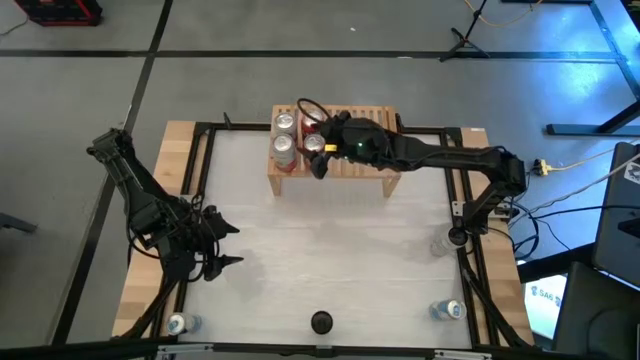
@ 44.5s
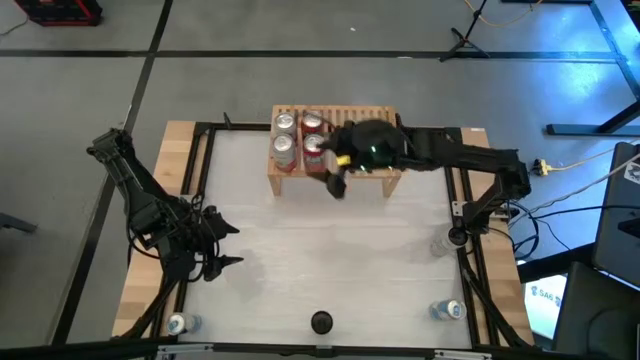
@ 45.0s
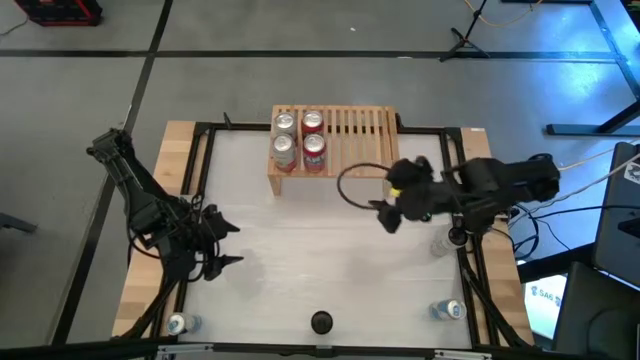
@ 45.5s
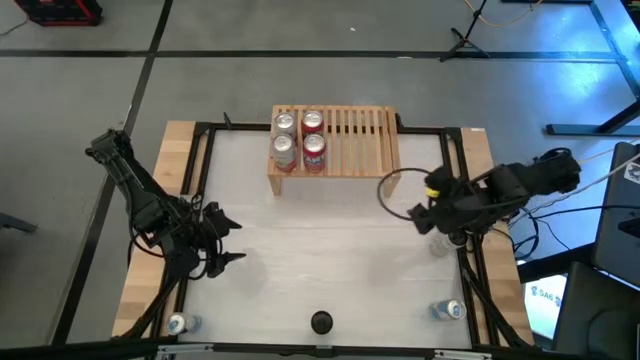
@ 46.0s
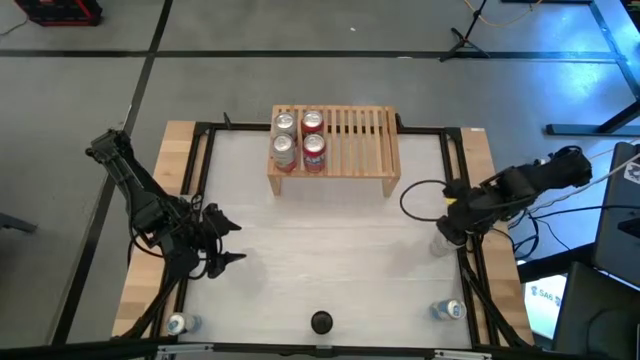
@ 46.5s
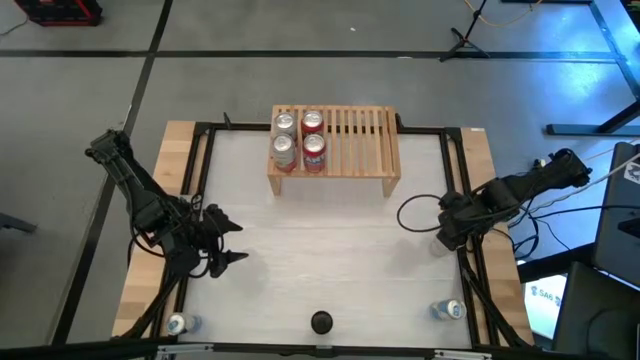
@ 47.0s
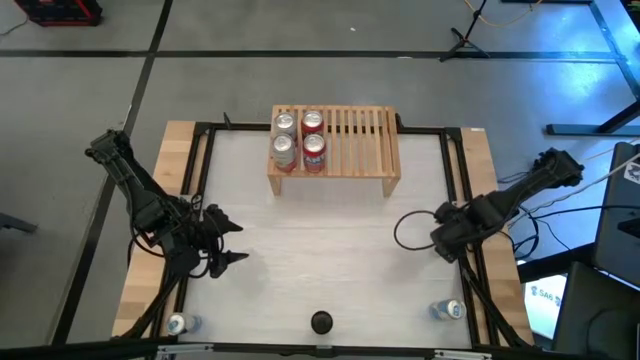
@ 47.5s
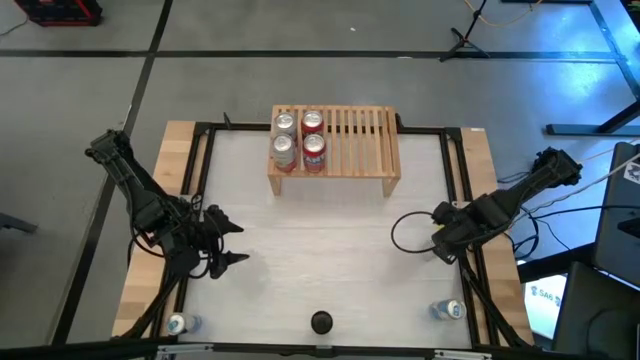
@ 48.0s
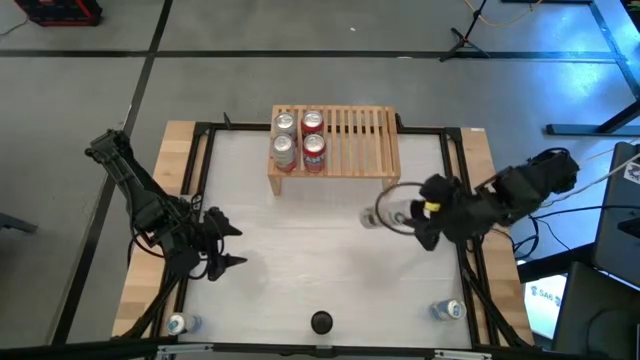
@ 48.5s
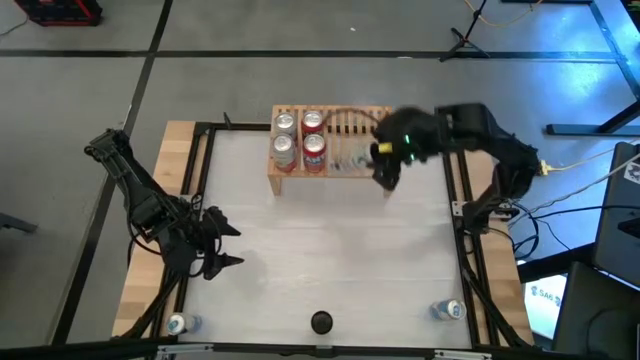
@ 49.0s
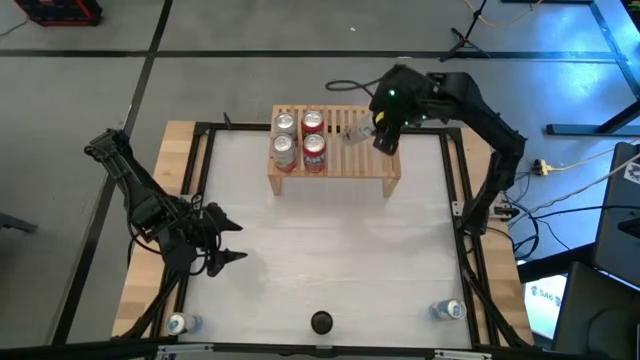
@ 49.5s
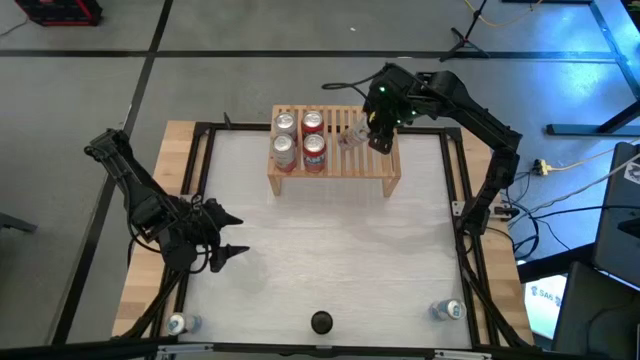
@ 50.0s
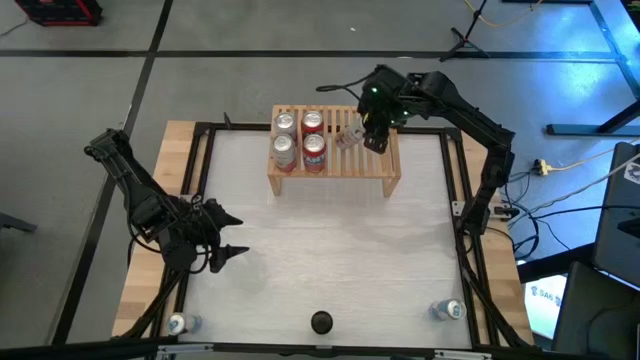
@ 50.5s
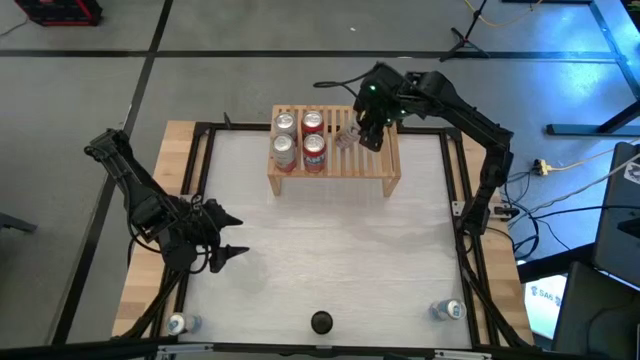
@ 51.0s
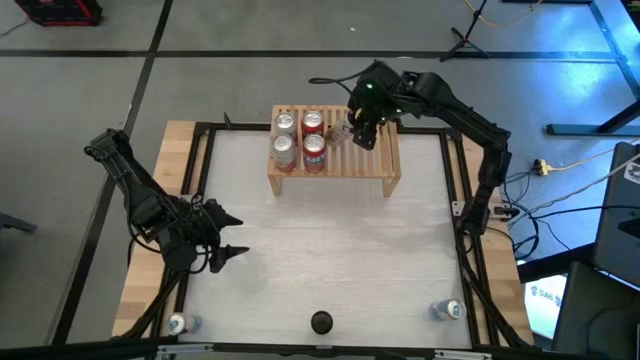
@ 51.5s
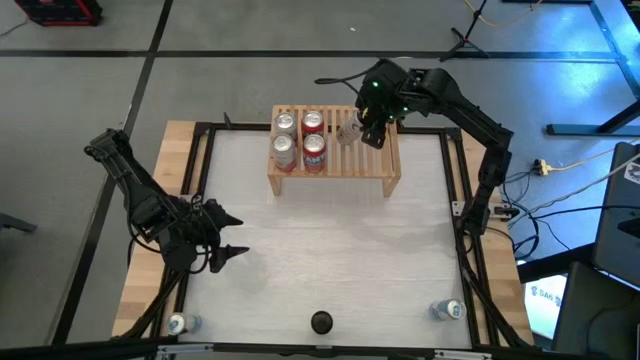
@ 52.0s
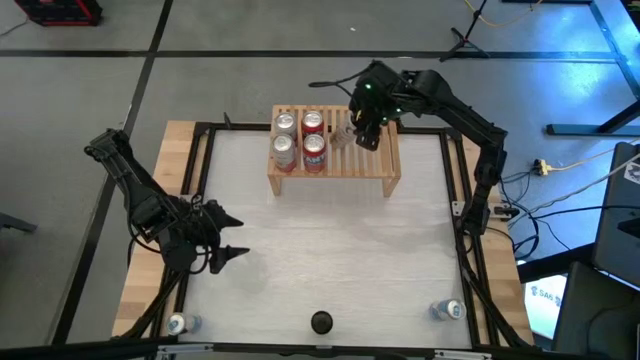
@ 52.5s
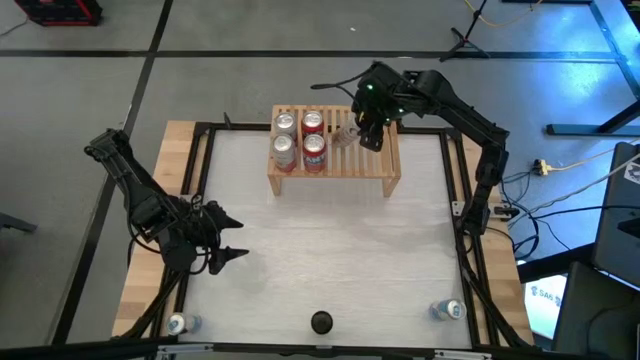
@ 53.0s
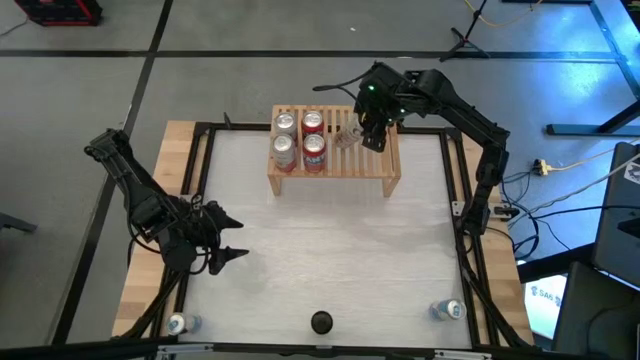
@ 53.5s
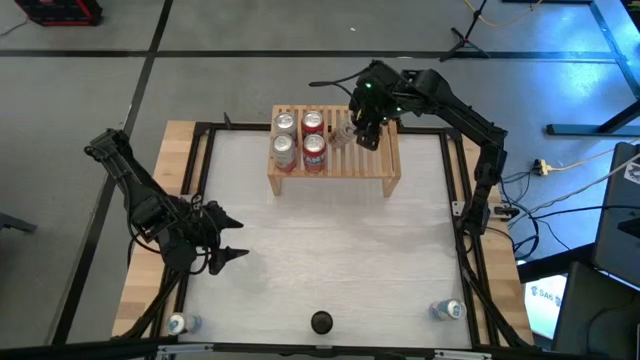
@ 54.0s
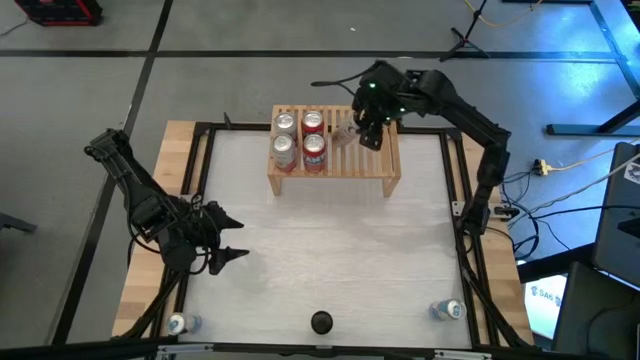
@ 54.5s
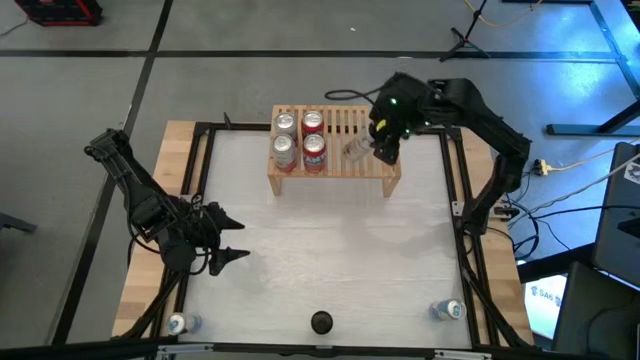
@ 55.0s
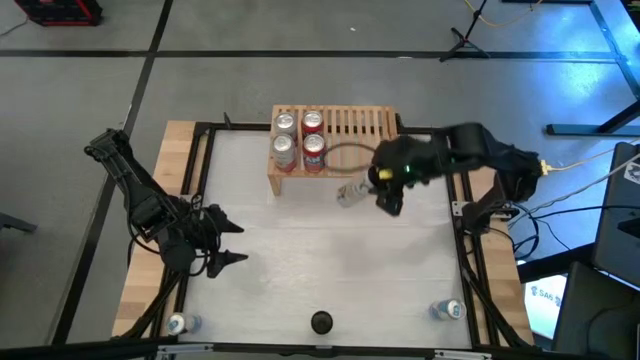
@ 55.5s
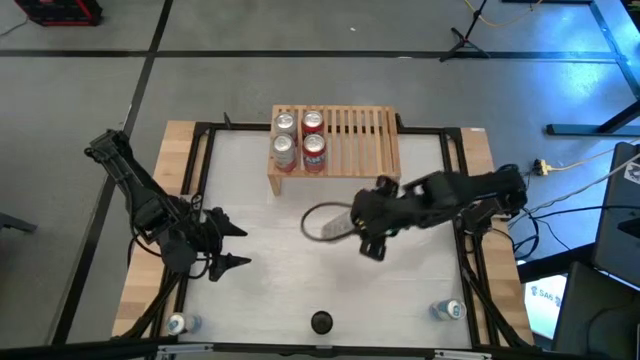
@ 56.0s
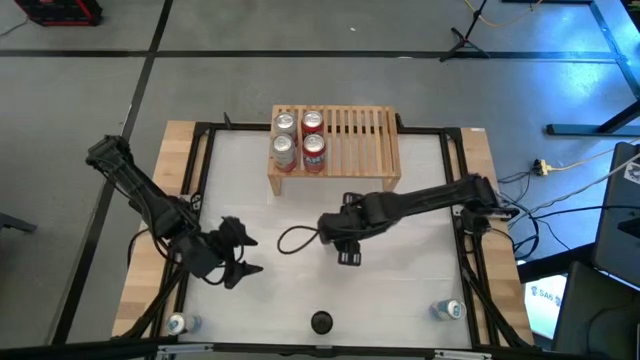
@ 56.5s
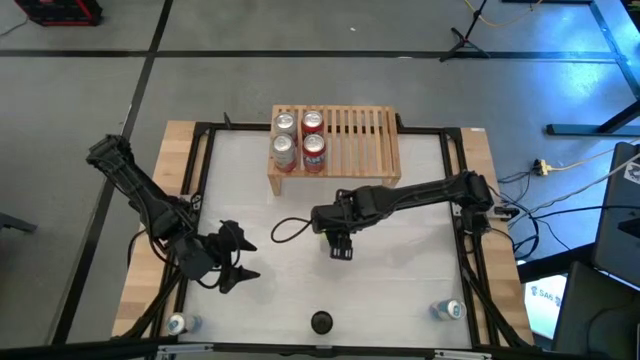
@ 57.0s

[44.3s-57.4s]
Task: Place canned beverage on shelf
Put the top white yellow soda can on the shelf

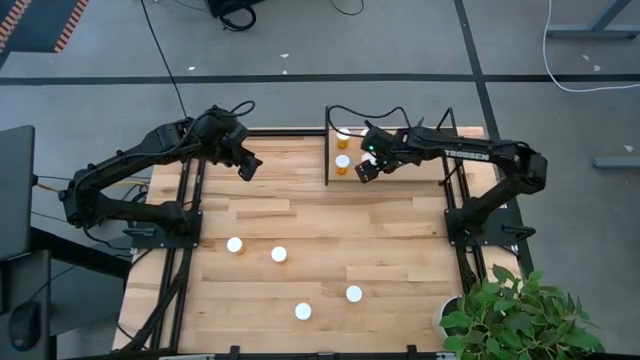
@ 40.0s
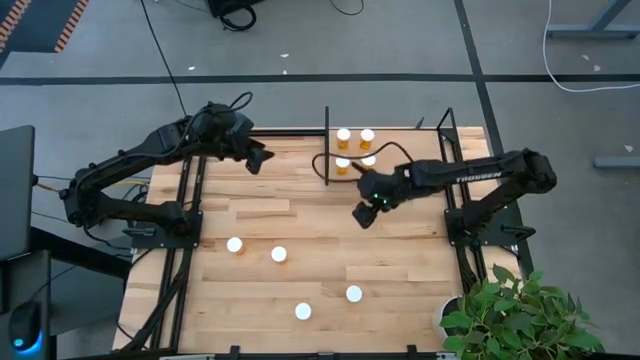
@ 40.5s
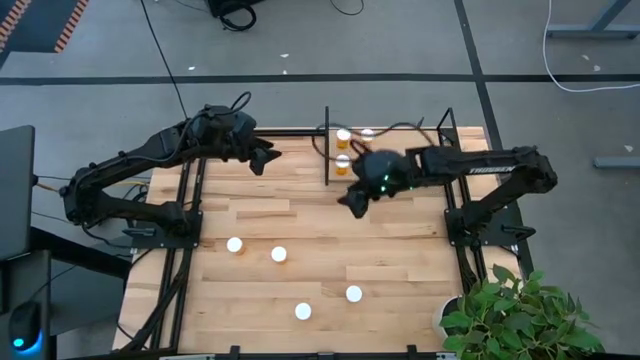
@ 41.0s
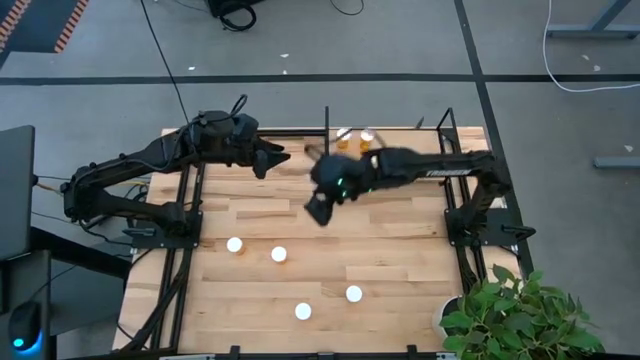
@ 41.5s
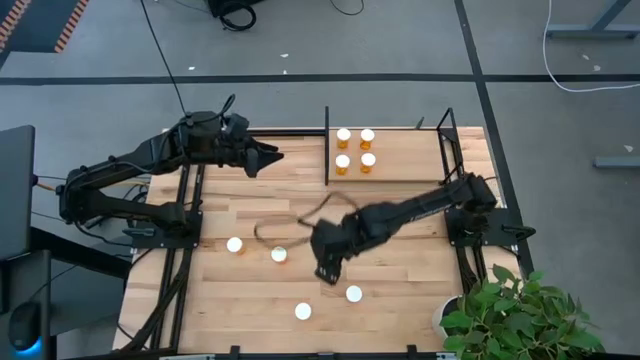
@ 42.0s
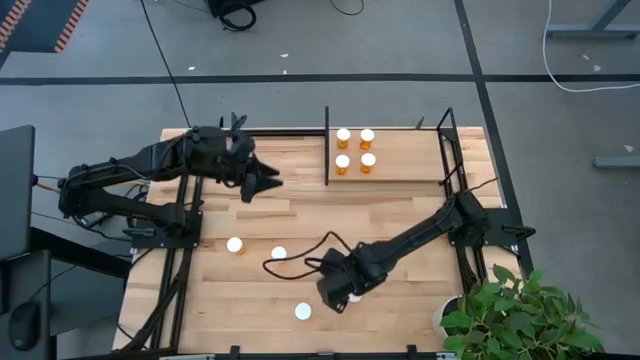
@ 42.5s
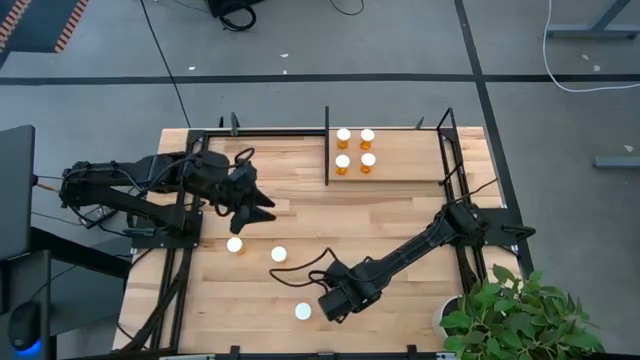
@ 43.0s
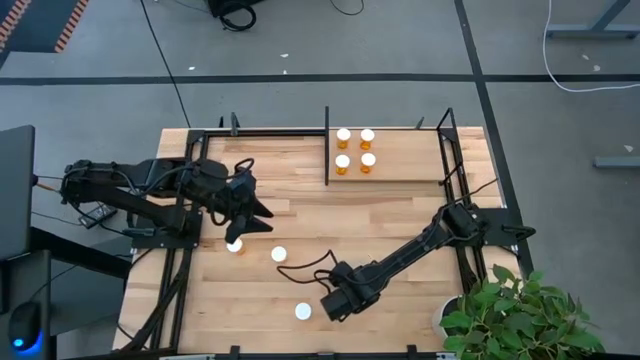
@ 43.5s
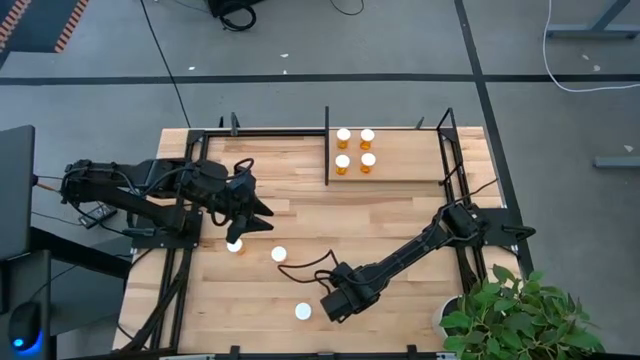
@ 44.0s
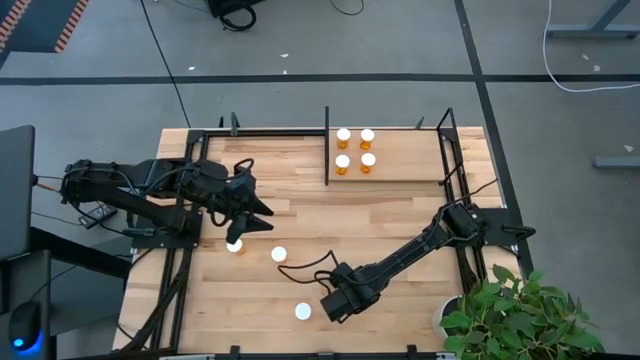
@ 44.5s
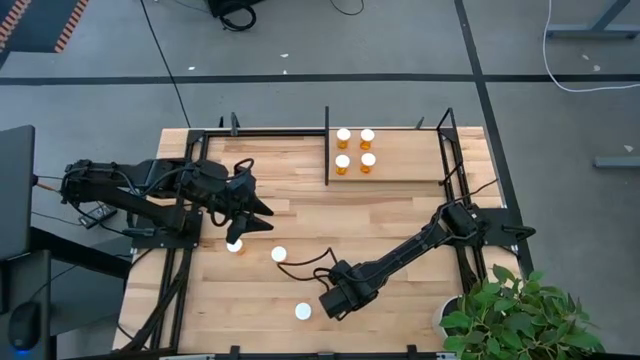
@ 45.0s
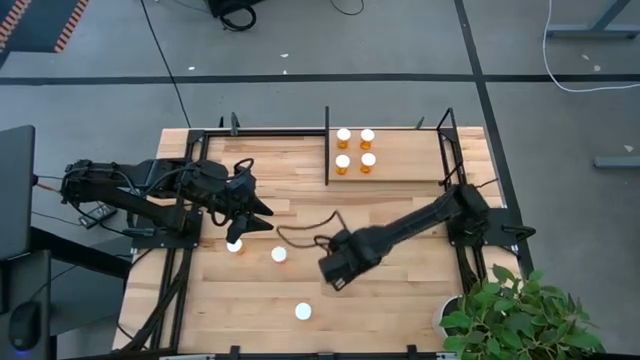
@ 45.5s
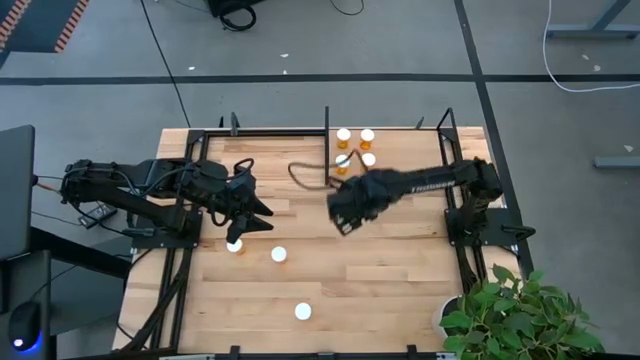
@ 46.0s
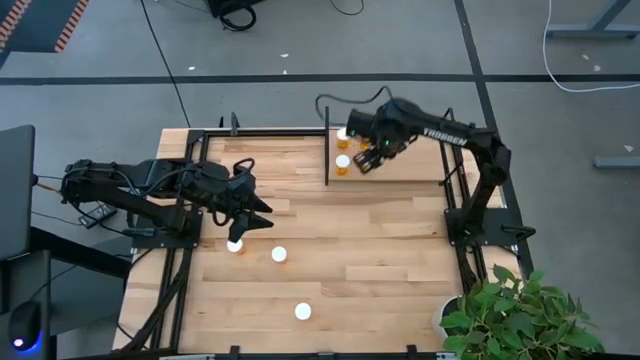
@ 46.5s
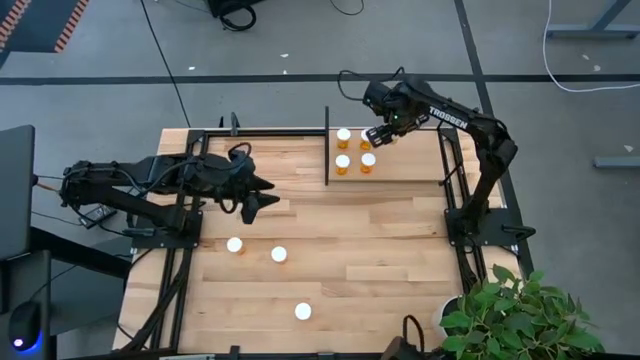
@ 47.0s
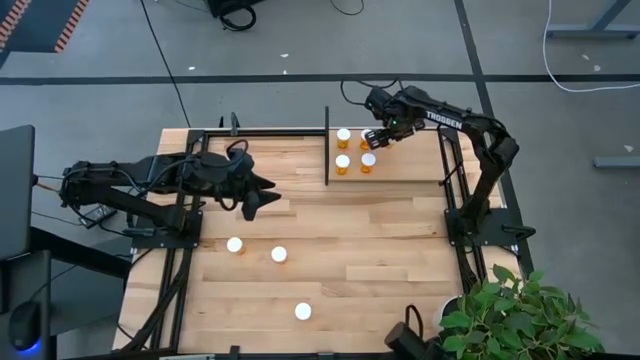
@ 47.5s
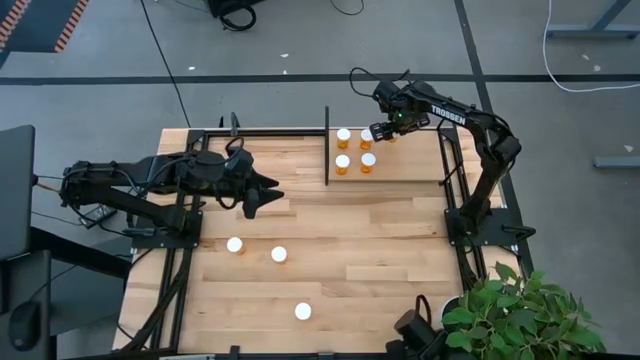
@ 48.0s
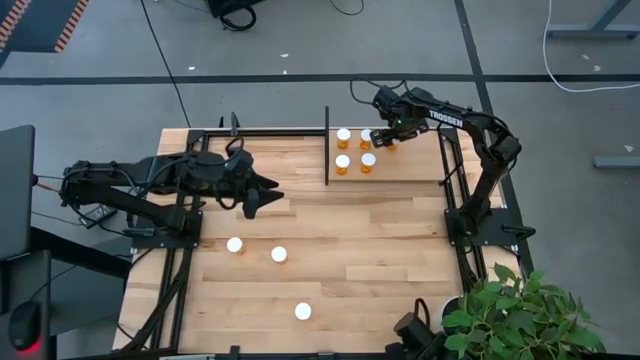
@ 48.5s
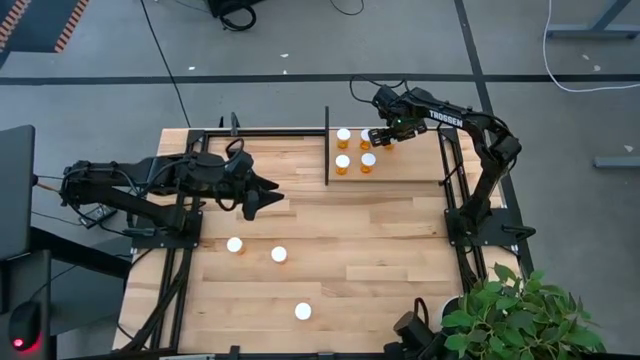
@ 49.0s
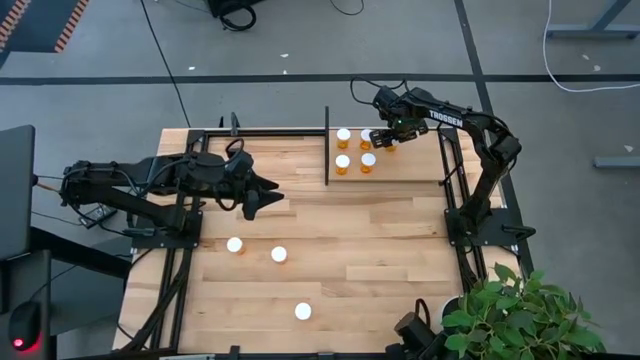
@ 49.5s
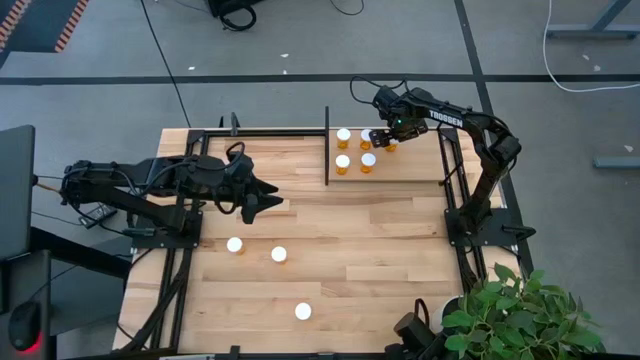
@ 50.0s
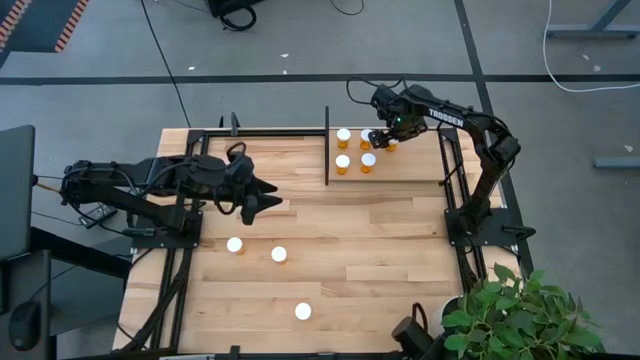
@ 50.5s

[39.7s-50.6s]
Task: Pick and place medicine bottles onto shelf by color
Put the orange pill bottle on the shelf
